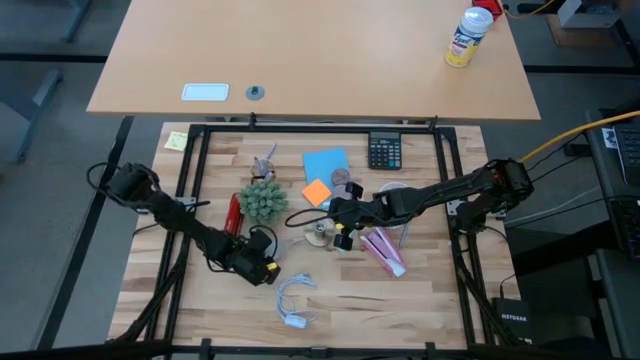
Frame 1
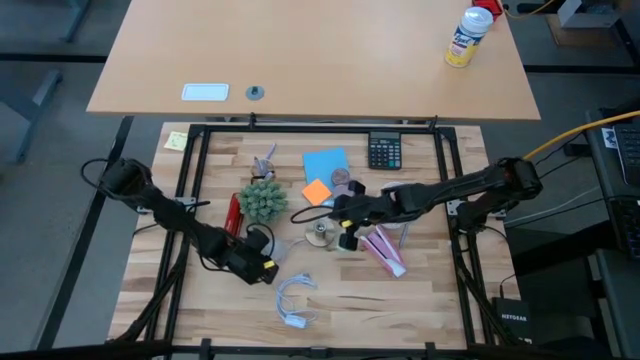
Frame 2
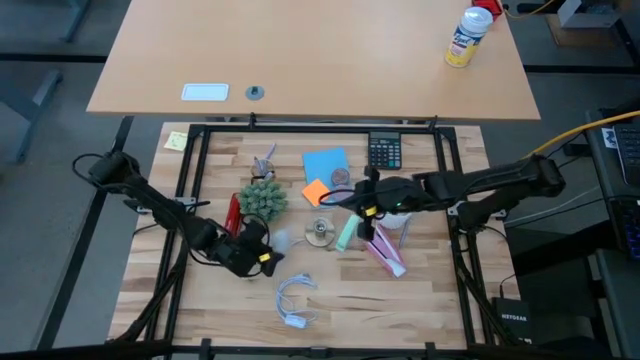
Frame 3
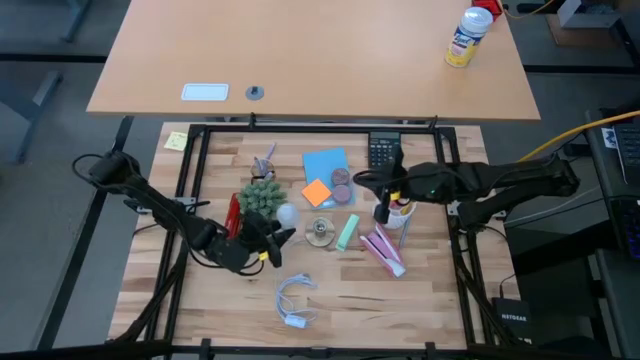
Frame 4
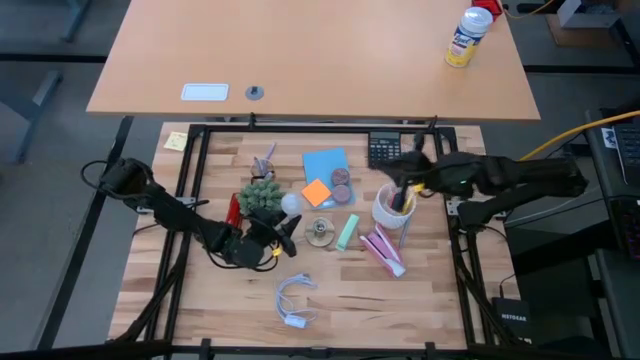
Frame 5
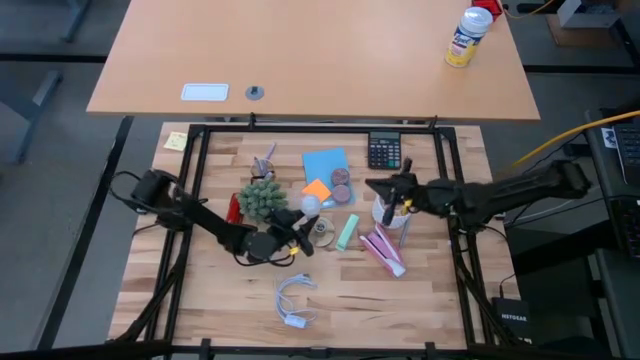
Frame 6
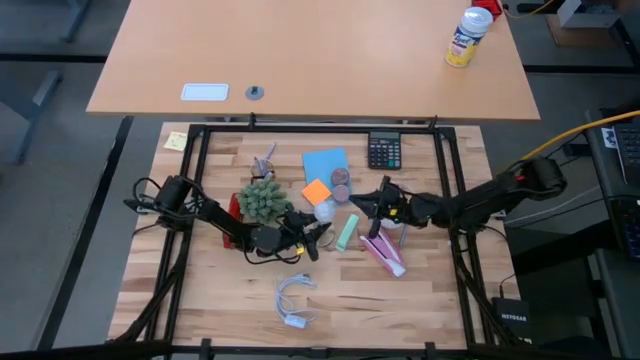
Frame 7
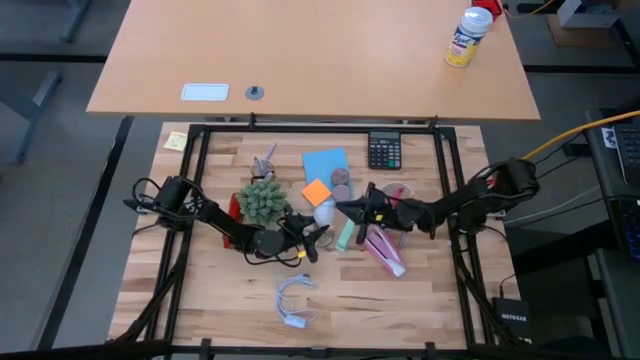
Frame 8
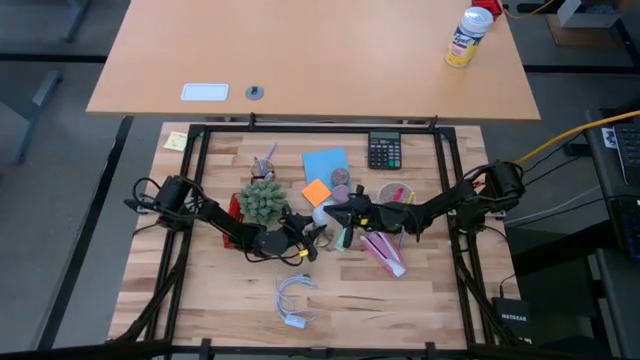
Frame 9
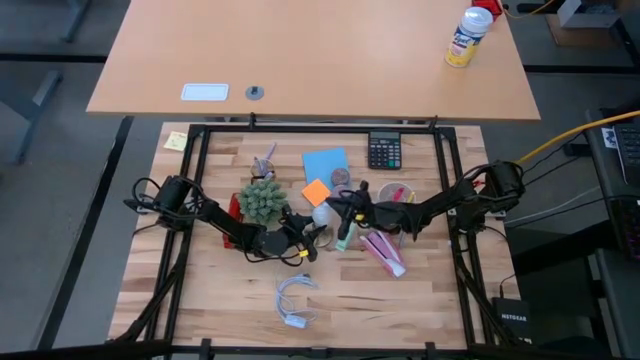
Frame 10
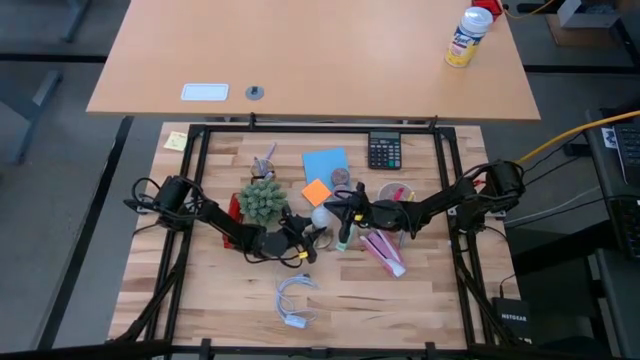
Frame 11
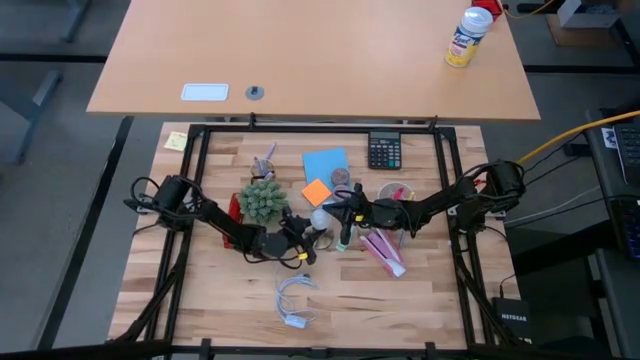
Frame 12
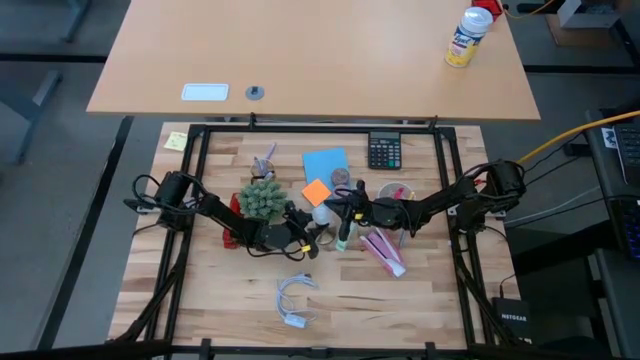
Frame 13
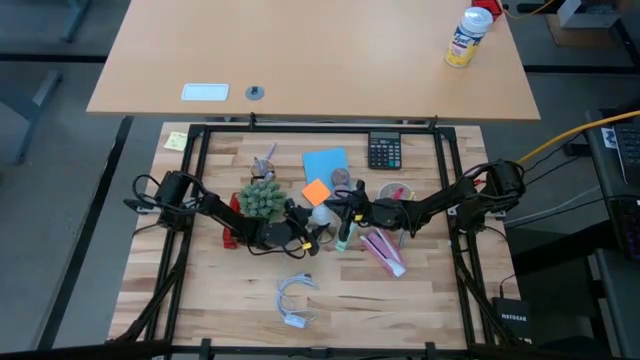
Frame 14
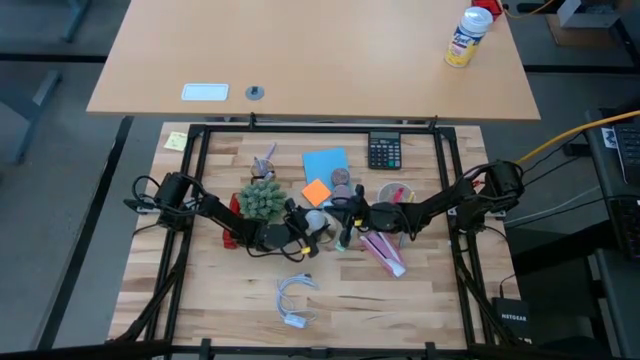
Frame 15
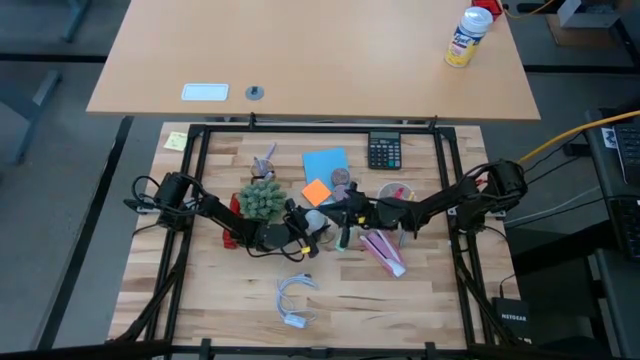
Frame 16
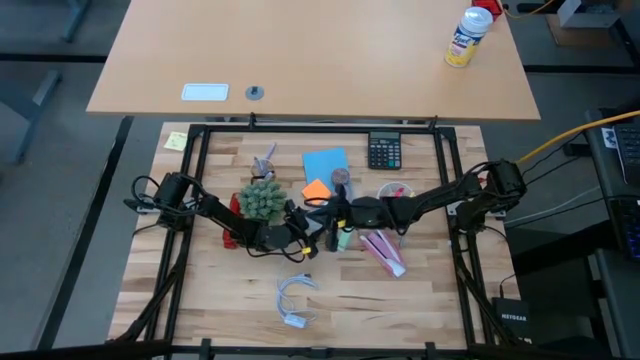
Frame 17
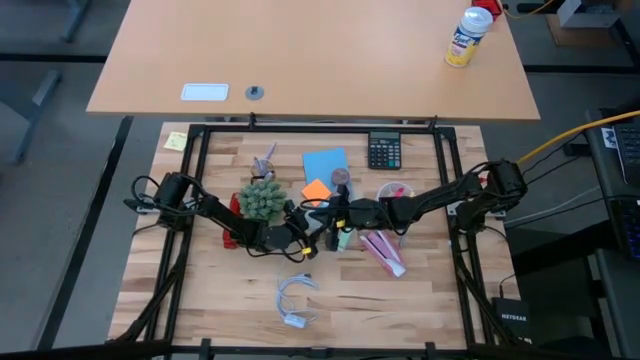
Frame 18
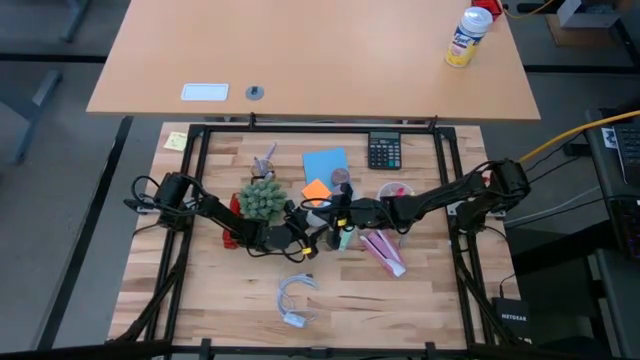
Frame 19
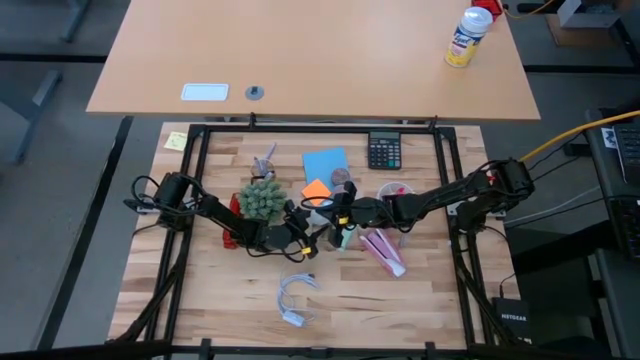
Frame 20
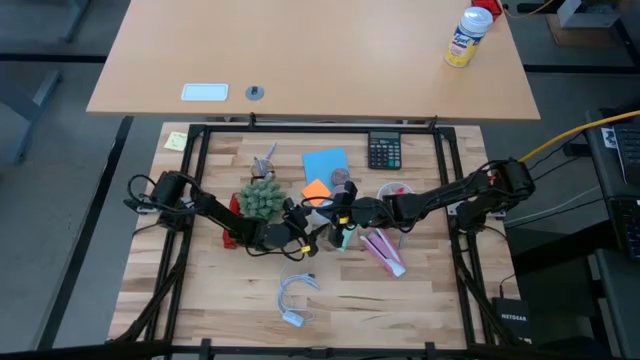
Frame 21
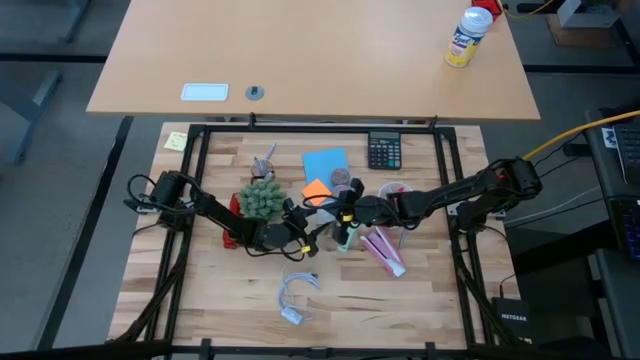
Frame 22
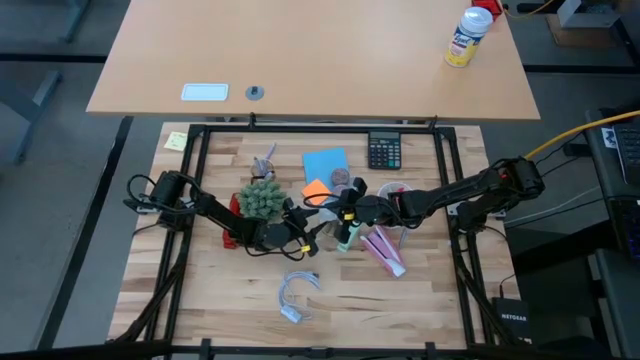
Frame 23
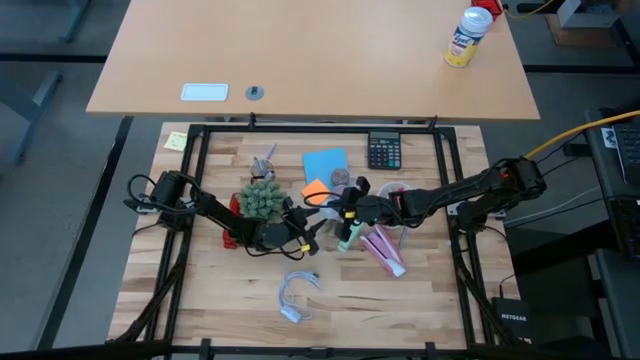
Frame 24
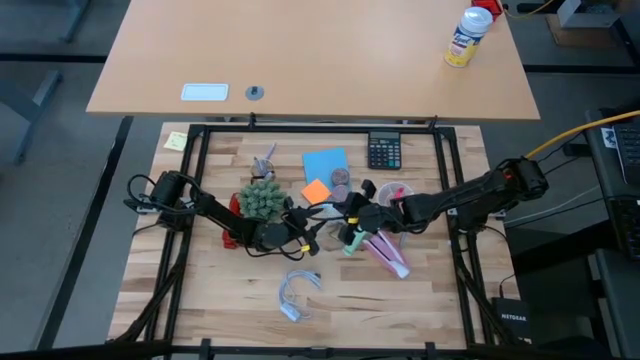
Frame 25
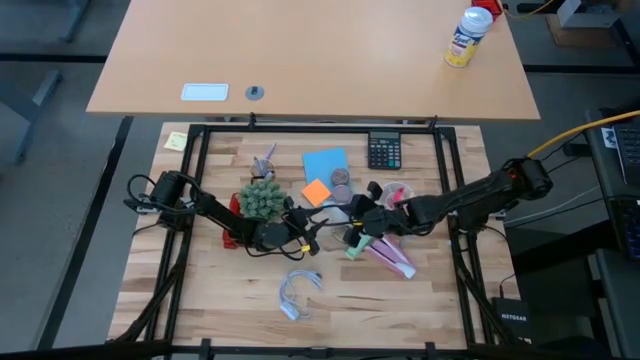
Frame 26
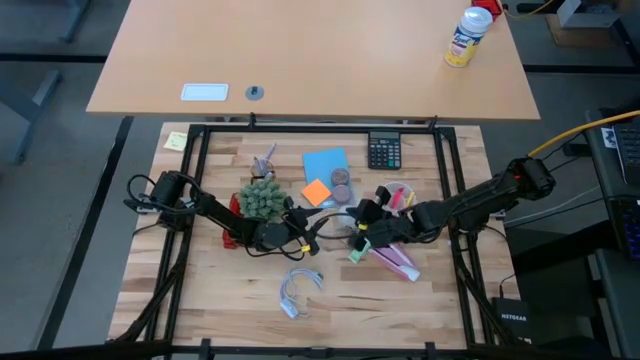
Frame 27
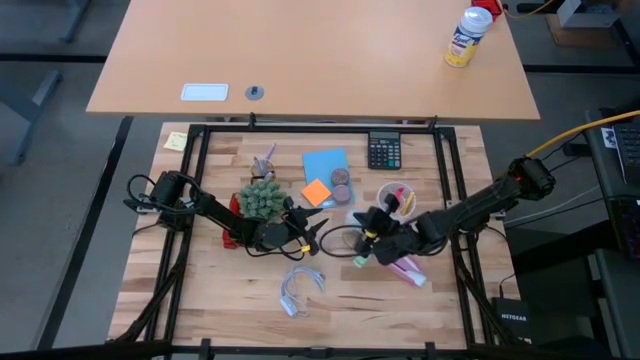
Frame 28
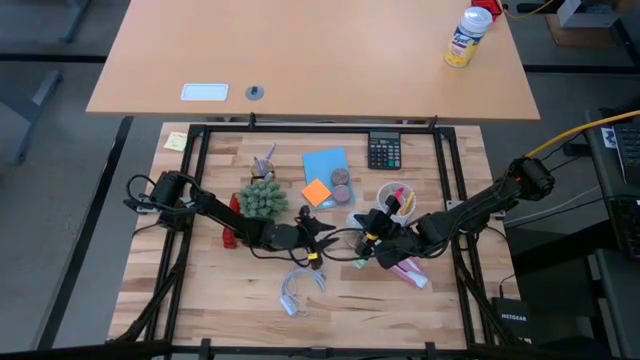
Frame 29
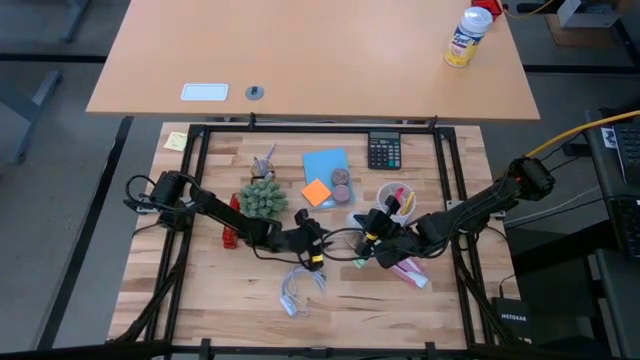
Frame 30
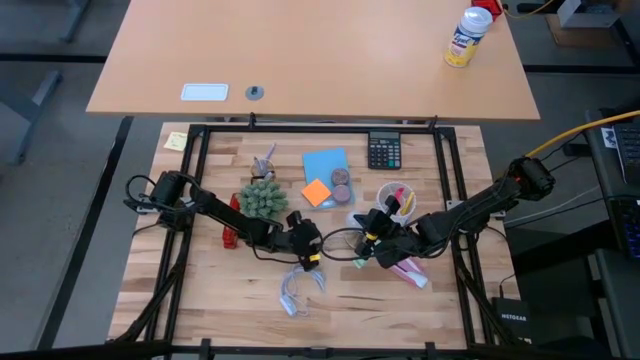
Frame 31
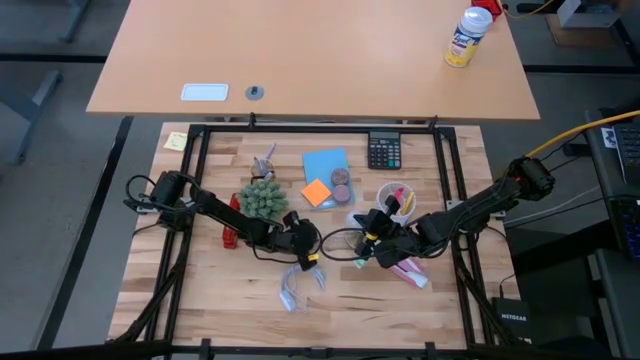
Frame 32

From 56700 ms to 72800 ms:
Task: Screw lightbulb
Insert the white lightbulb into the lamp socket

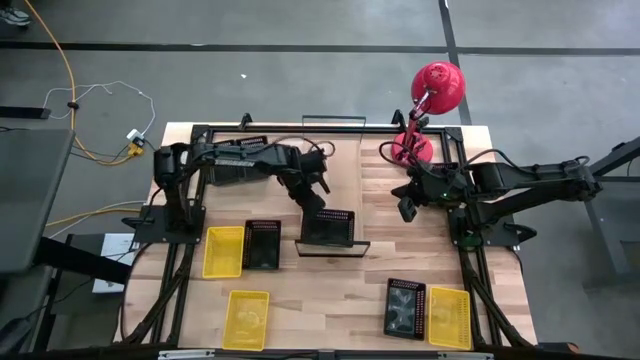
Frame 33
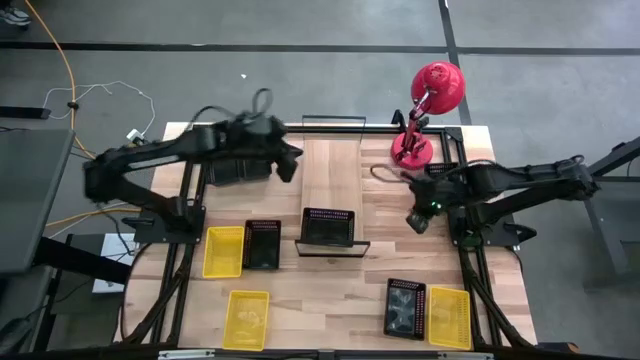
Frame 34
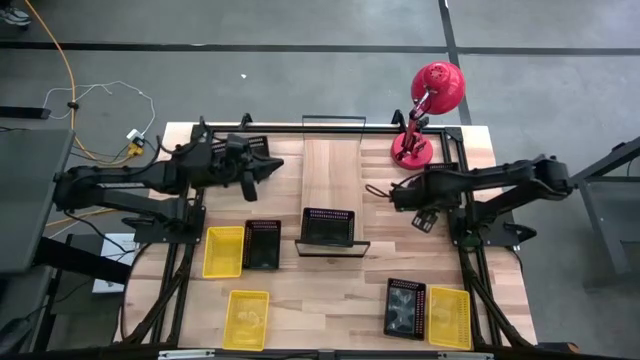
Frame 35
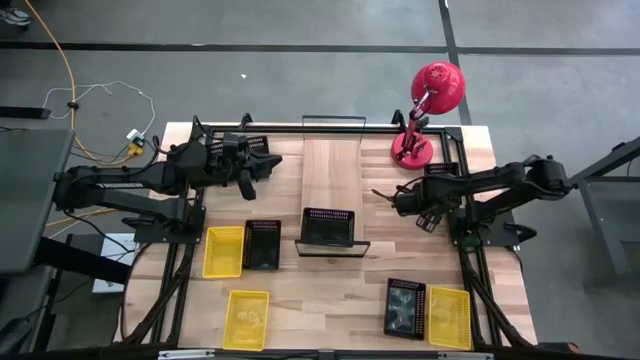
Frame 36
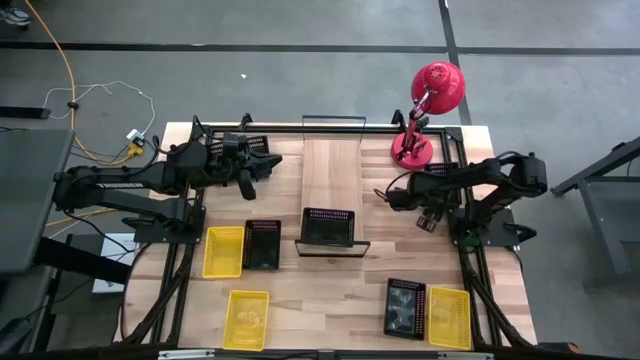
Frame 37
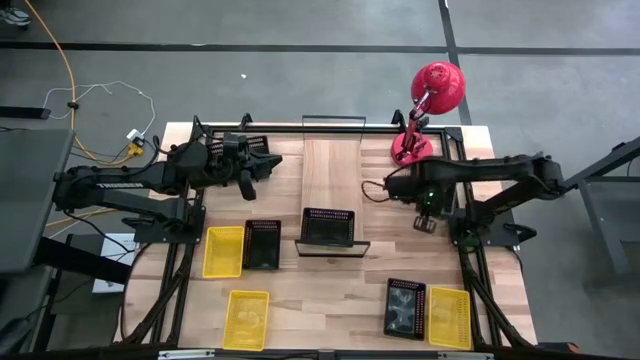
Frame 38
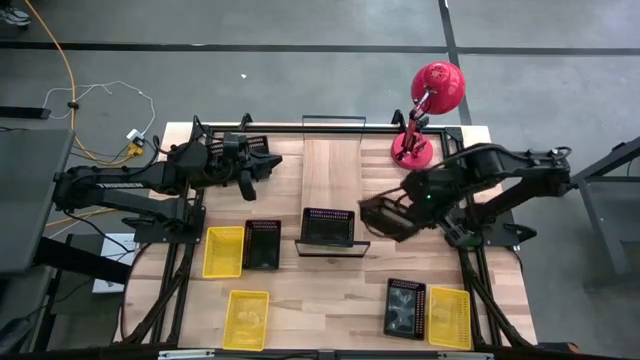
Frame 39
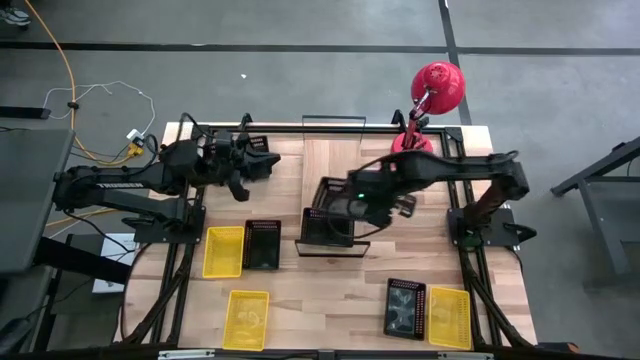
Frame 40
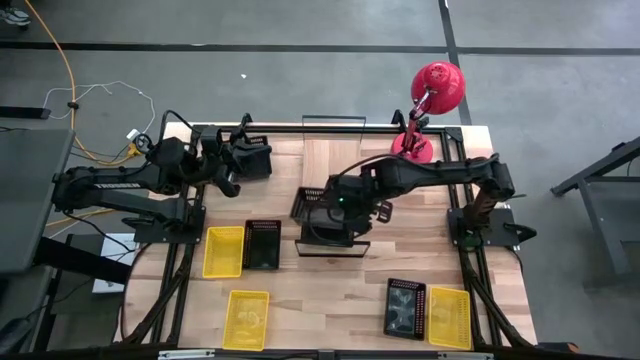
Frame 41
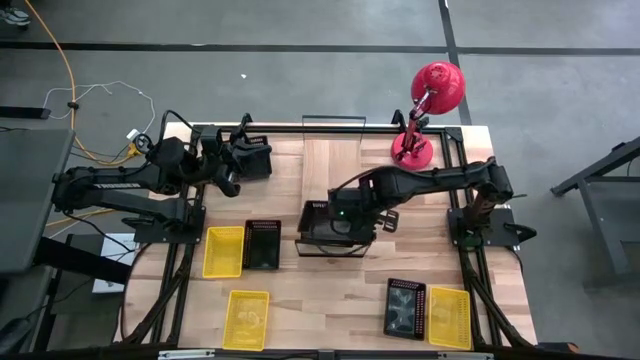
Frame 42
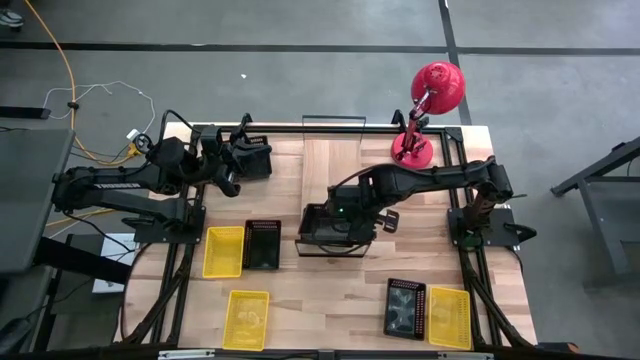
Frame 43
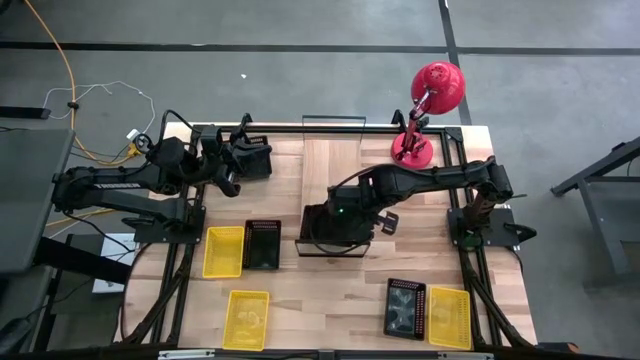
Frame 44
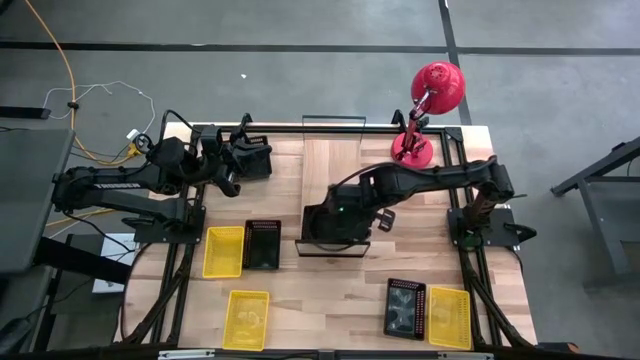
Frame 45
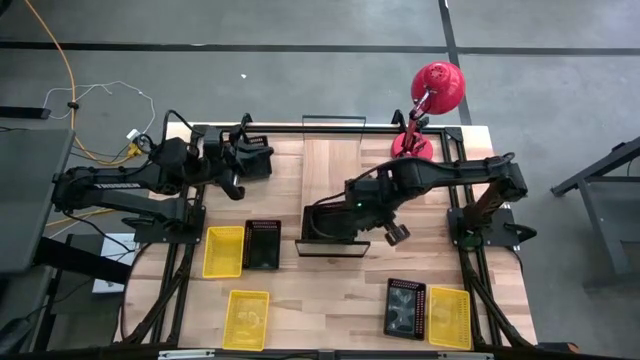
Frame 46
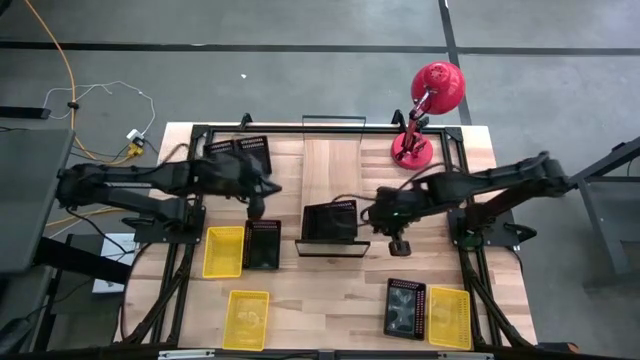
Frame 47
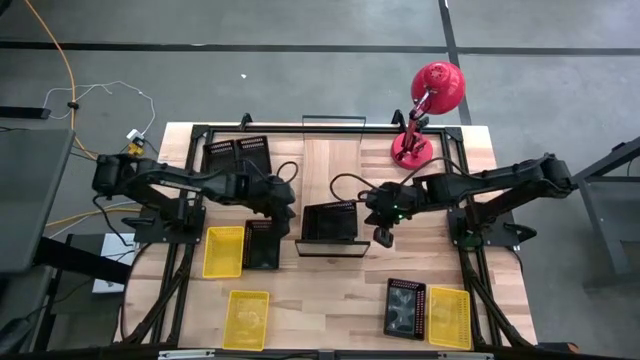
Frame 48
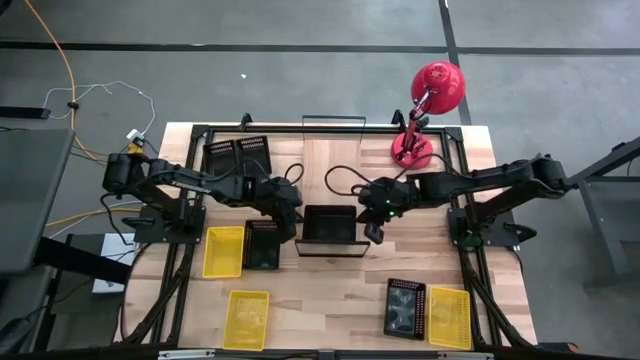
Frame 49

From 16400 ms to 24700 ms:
Task: Stack baskets on shelf by color
Stack the black bin on top of the black bin on the shelf
